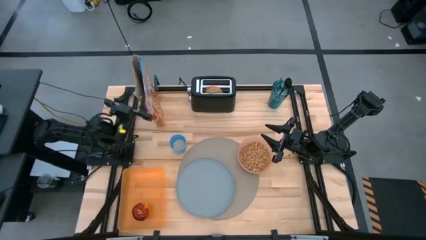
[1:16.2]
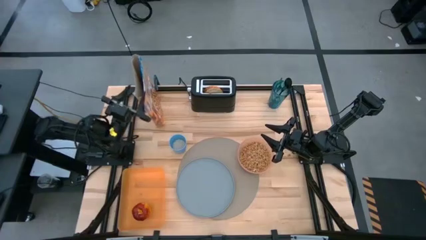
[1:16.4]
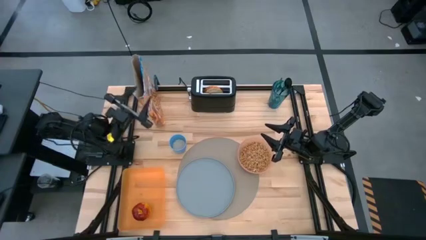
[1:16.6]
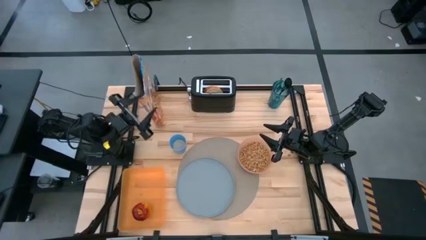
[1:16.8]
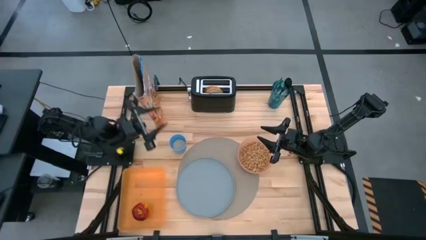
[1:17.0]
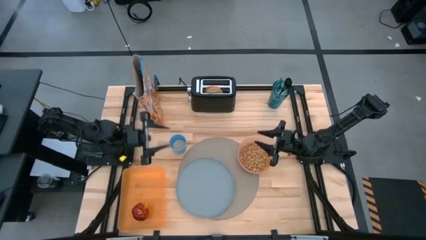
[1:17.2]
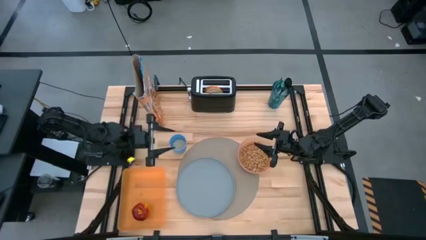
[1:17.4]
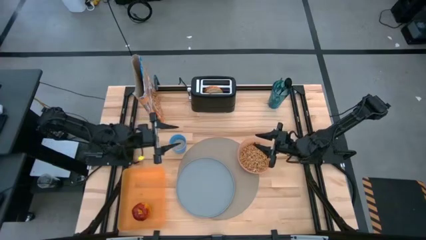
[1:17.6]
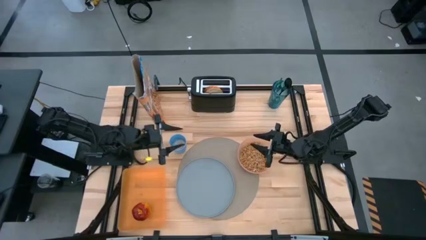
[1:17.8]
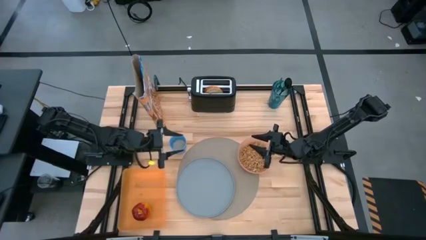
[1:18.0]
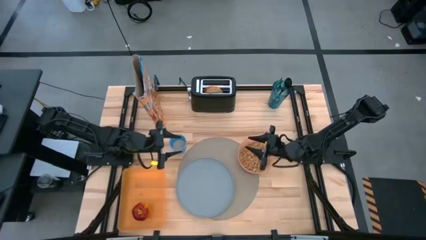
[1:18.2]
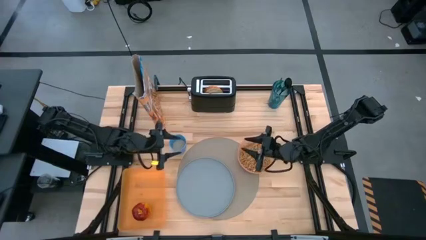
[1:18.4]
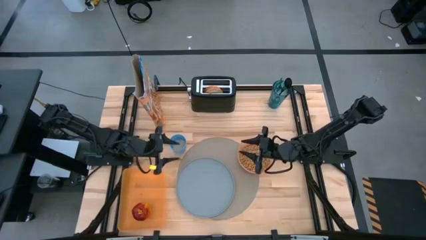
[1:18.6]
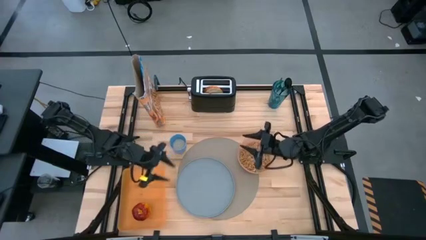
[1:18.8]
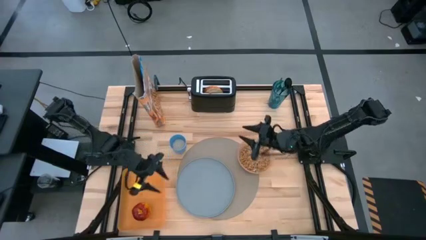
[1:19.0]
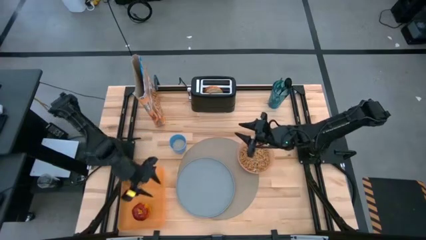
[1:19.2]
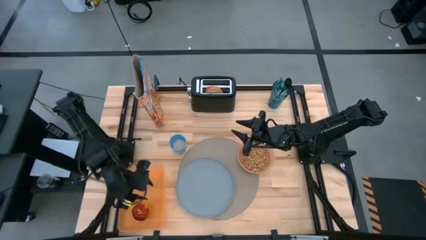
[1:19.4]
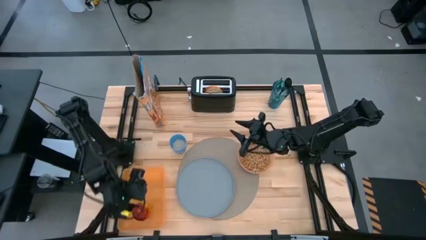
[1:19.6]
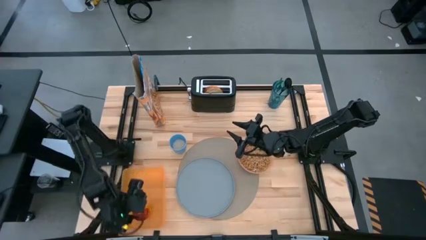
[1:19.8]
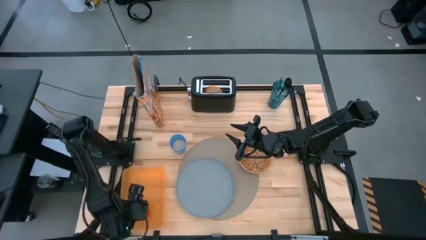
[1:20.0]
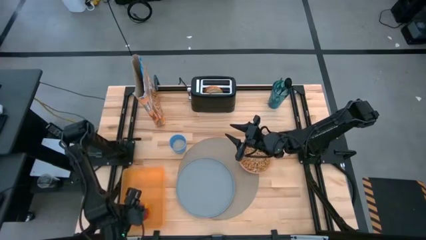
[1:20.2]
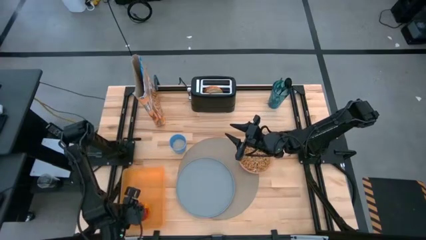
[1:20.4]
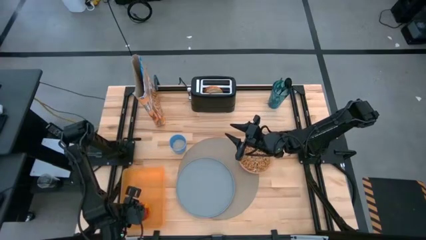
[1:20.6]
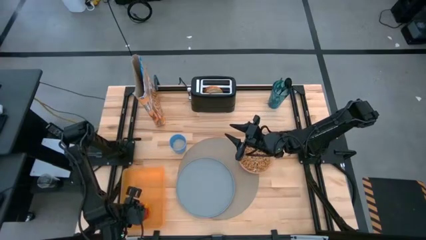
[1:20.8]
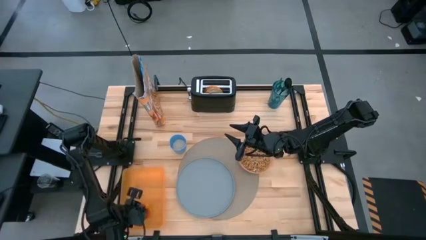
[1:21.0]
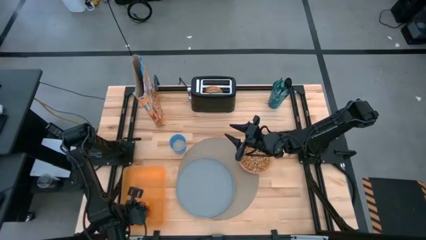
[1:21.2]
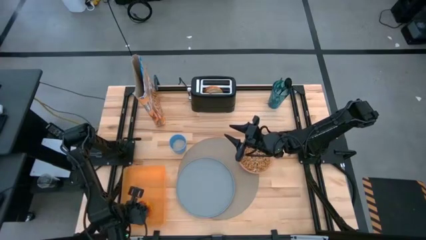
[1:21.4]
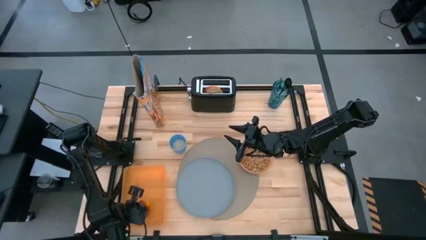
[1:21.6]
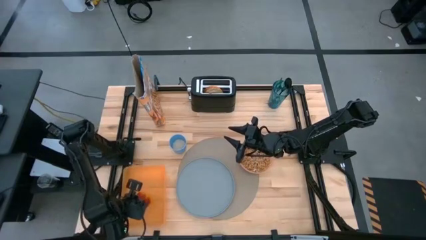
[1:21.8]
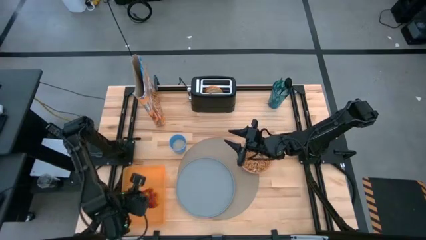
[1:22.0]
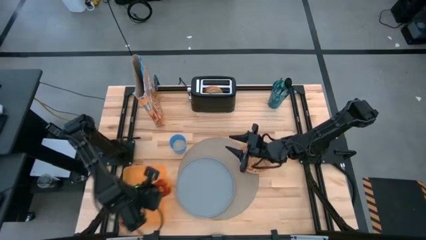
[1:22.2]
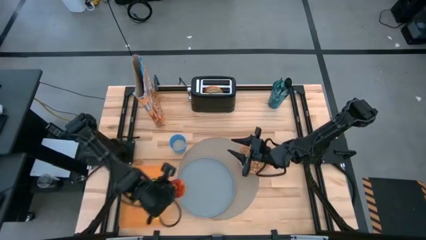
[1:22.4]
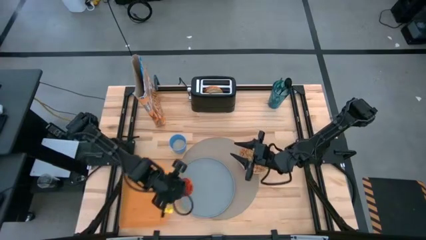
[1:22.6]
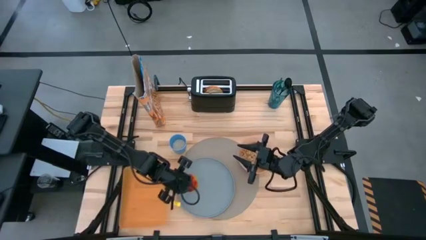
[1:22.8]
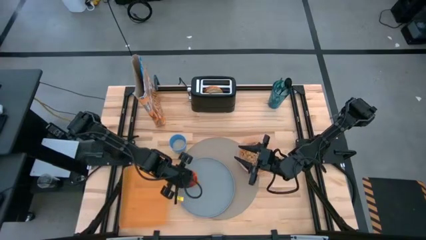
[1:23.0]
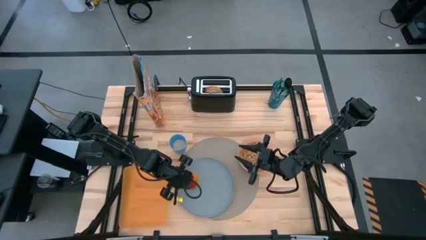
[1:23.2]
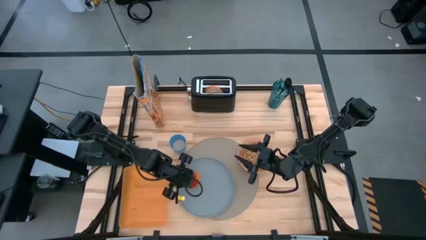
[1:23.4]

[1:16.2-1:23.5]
Task: Arrange a breakfast setting
Put the red apple on the blue plate

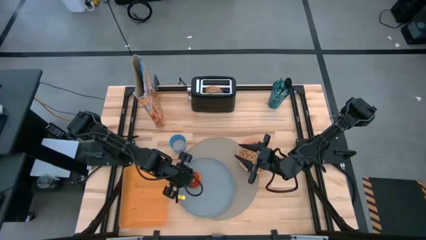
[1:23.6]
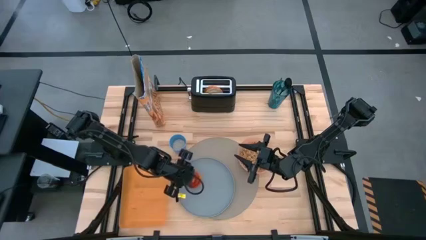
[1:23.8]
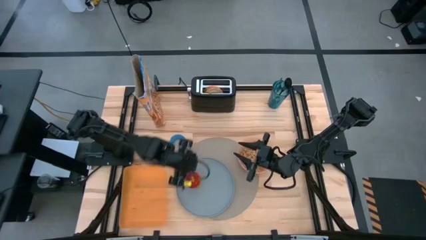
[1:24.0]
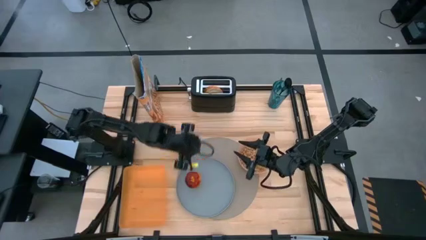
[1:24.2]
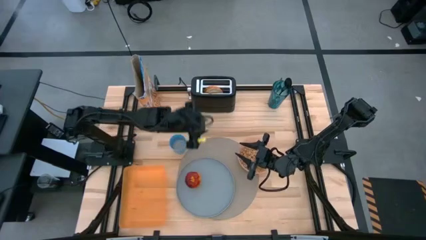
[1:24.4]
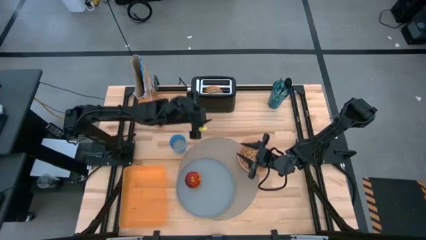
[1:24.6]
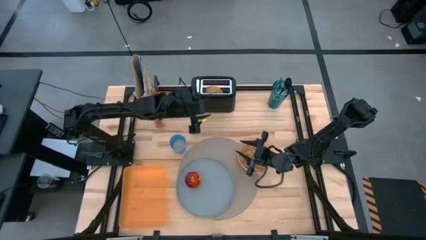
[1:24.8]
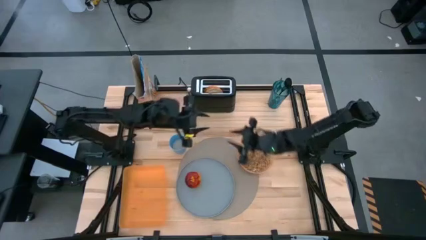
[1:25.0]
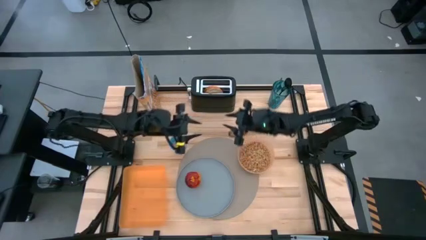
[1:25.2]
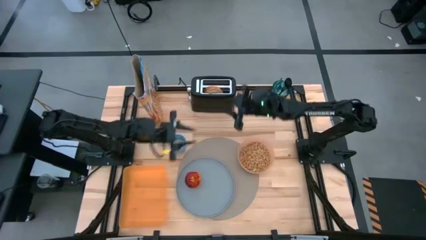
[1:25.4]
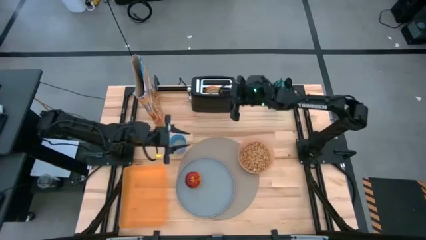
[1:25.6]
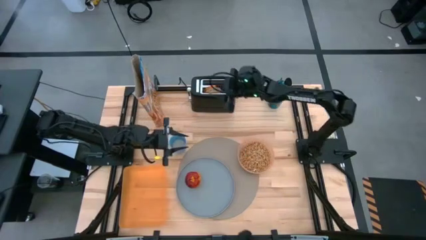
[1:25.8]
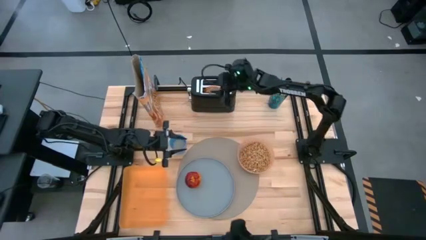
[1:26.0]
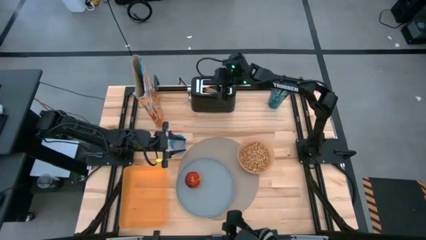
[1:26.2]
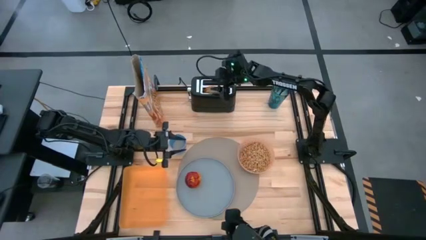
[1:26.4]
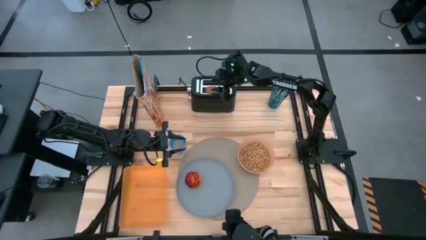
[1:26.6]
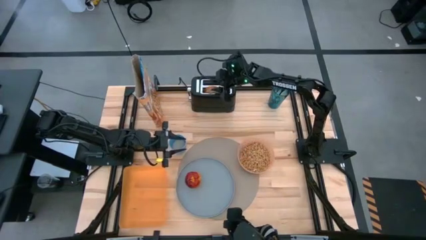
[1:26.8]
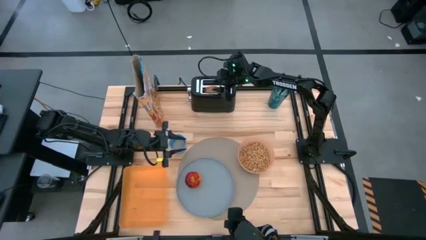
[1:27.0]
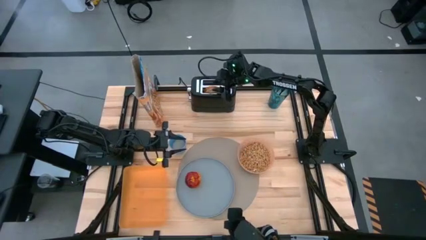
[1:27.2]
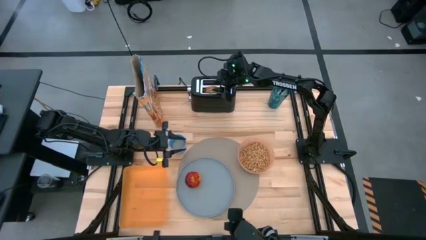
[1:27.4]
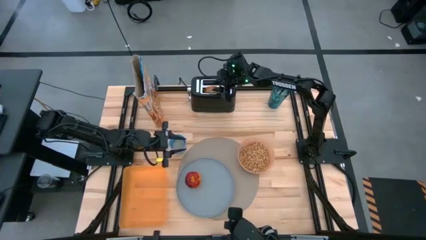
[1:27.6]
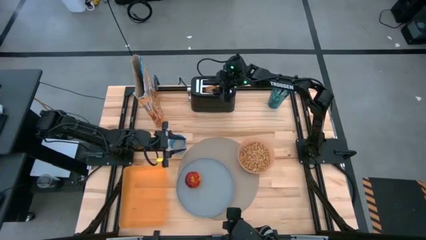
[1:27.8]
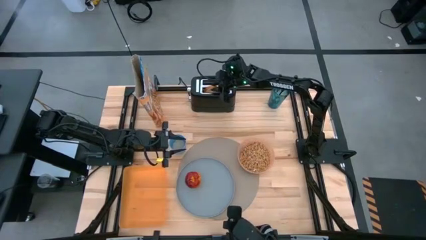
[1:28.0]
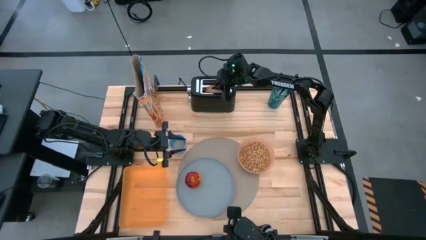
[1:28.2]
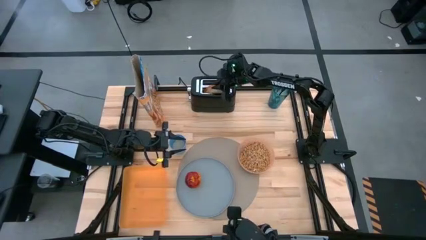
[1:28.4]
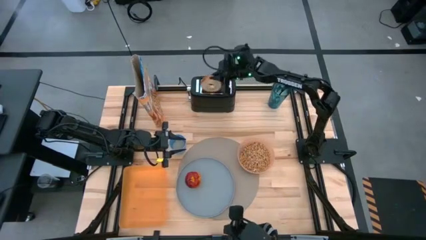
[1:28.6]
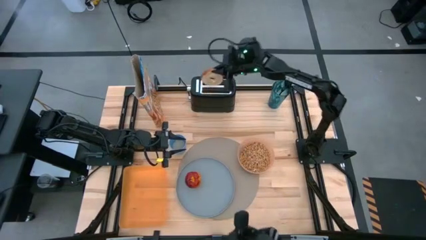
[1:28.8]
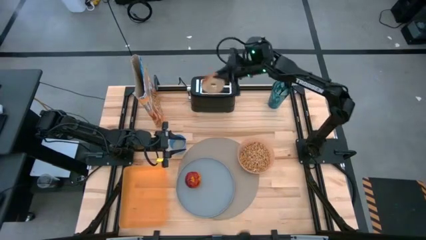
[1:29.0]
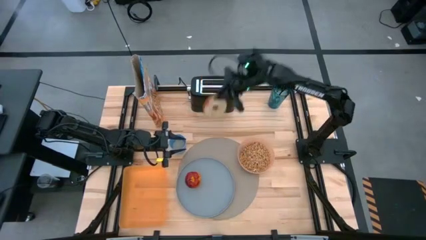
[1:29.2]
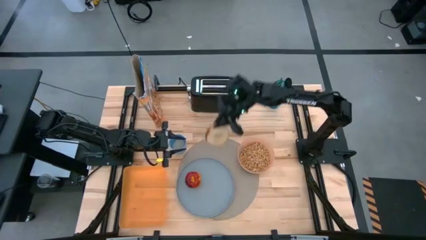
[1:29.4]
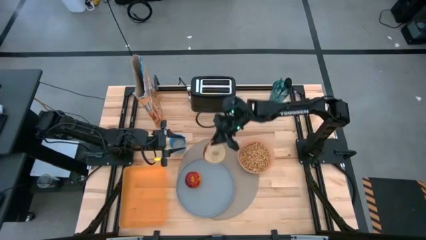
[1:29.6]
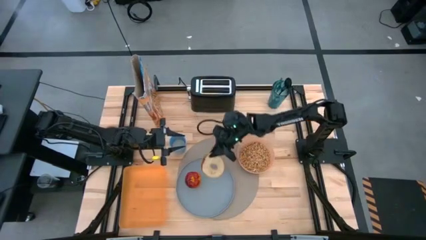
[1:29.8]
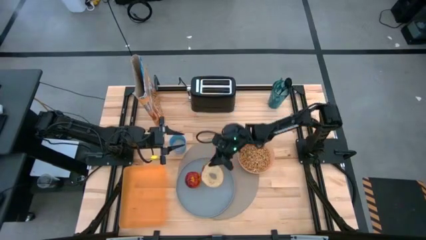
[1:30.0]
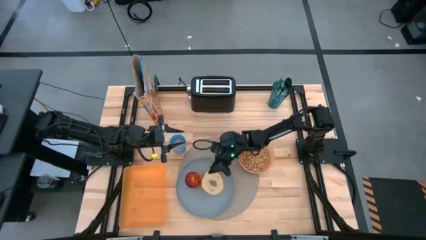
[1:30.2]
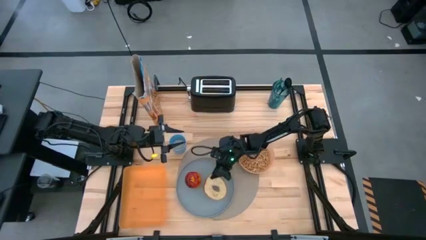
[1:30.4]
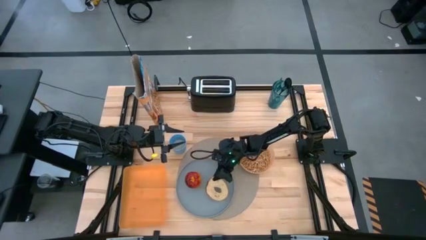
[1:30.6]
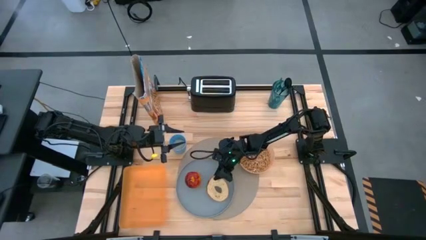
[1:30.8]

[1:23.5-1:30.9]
Put the bagel on the blue plate to the right of the red apple
